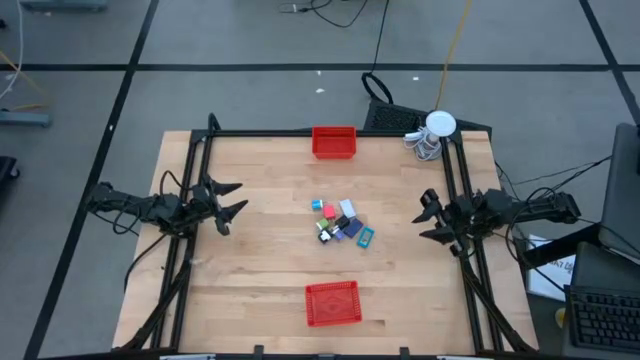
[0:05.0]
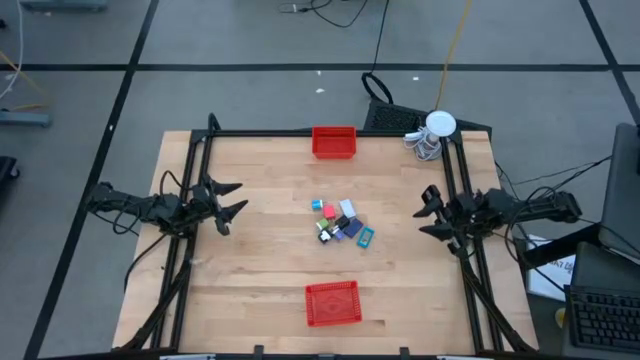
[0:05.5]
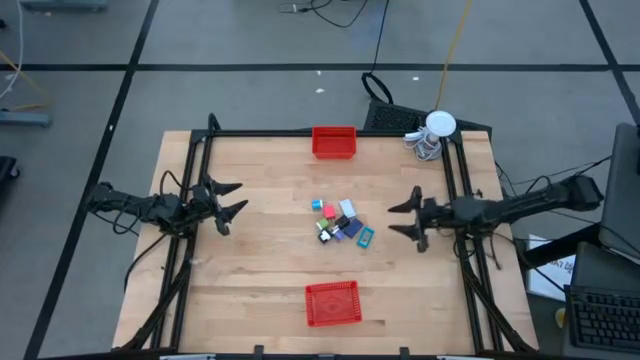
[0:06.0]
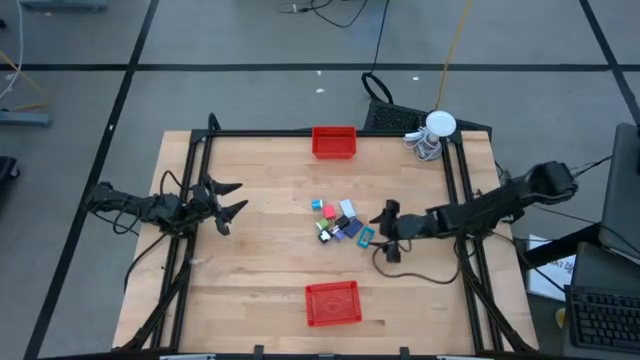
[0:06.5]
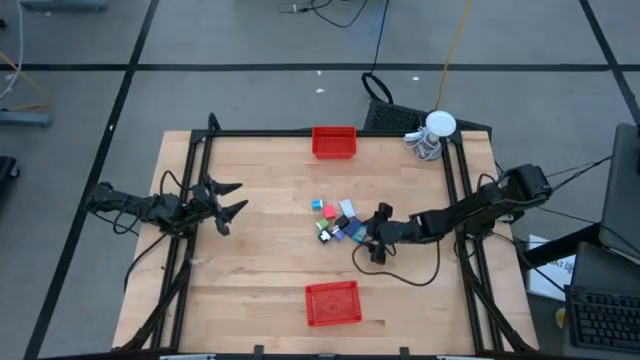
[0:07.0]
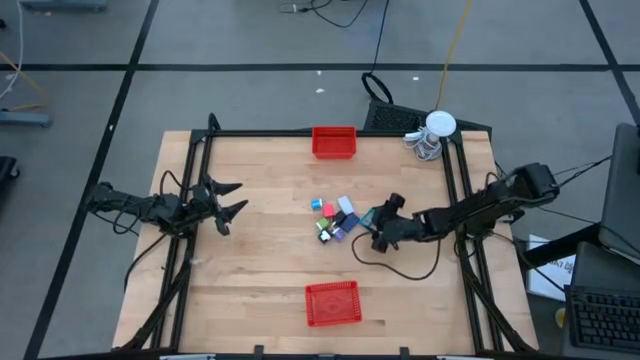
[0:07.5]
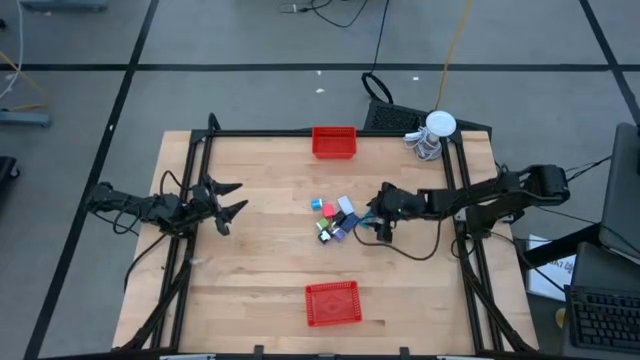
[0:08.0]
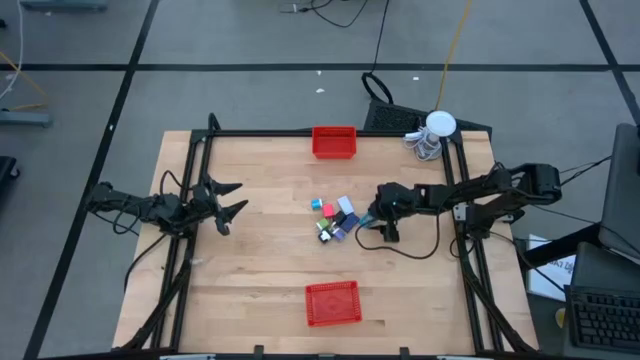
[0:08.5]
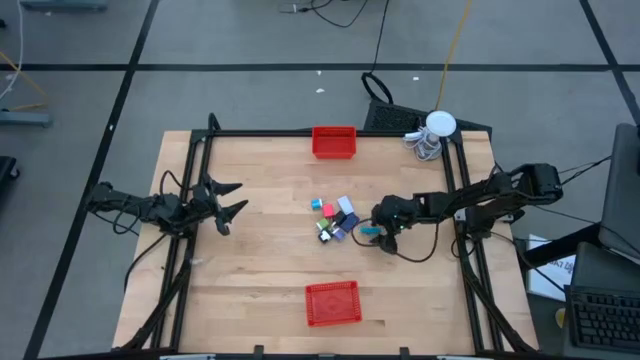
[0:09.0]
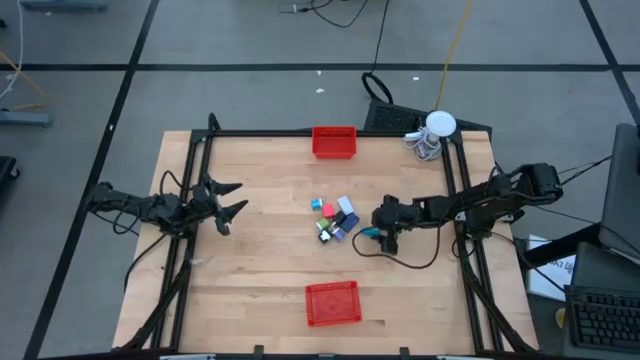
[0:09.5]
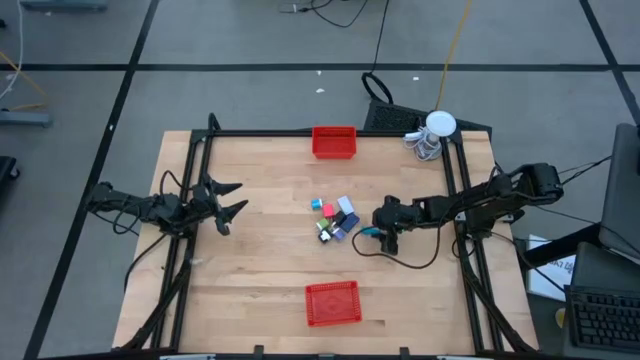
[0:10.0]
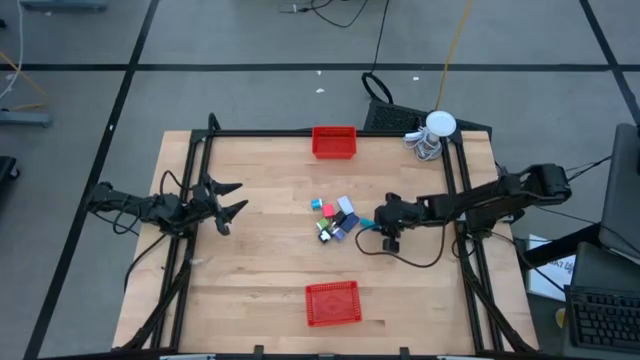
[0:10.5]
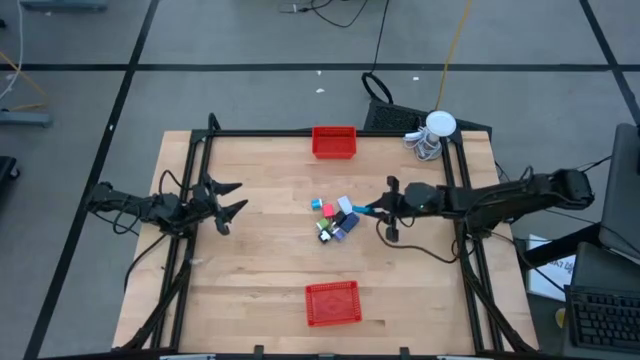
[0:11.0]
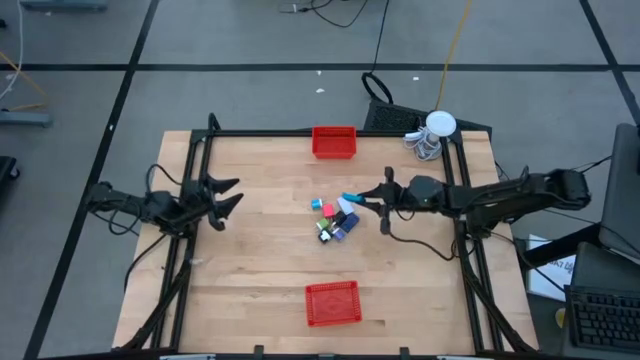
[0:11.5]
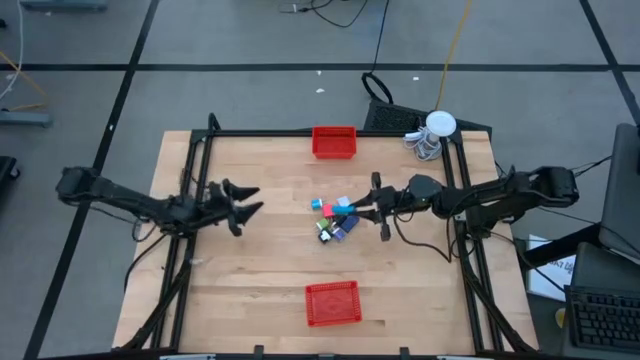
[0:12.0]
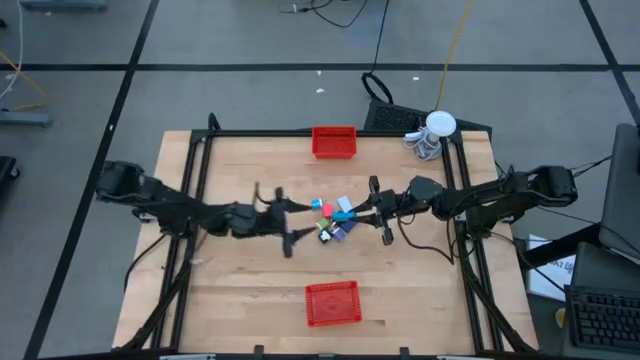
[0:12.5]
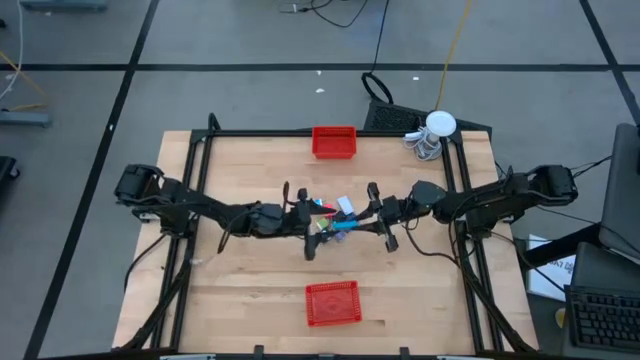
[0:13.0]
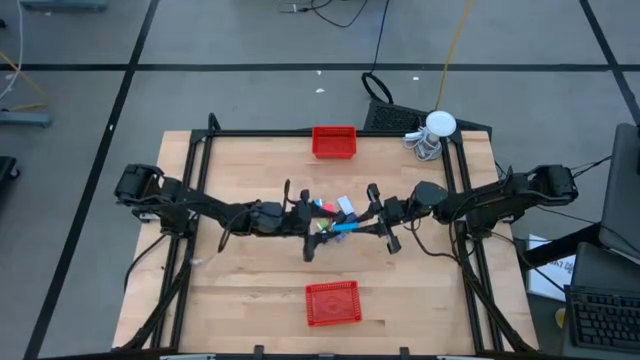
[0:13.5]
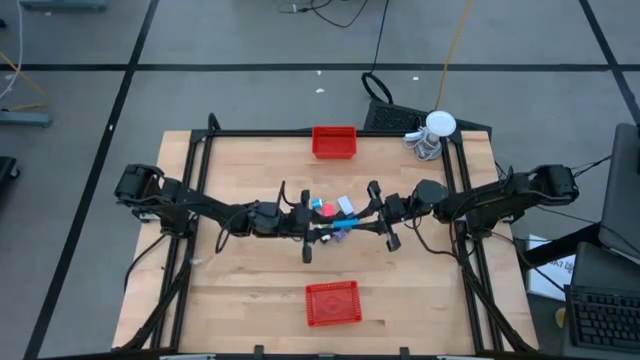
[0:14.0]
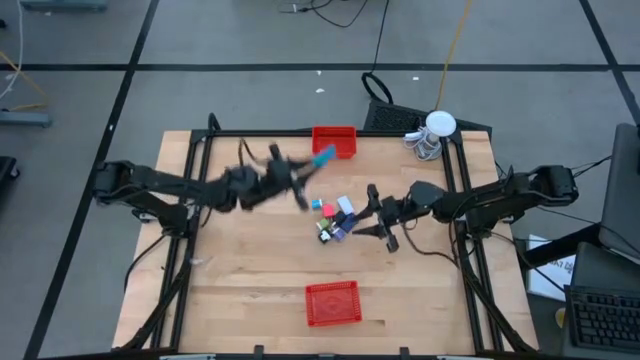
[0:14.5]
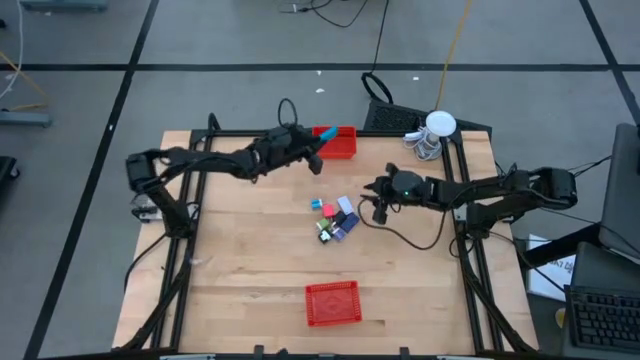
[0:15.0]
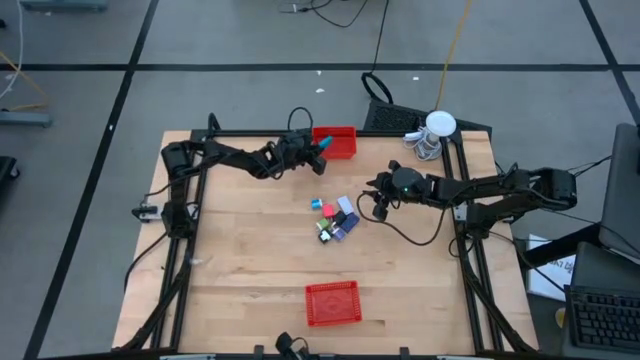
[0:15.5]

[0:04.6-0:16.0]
Task: Pick & Place Office items
Put the blue timer into the top orange bin

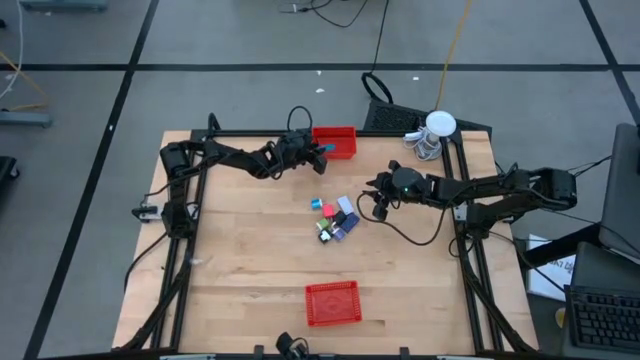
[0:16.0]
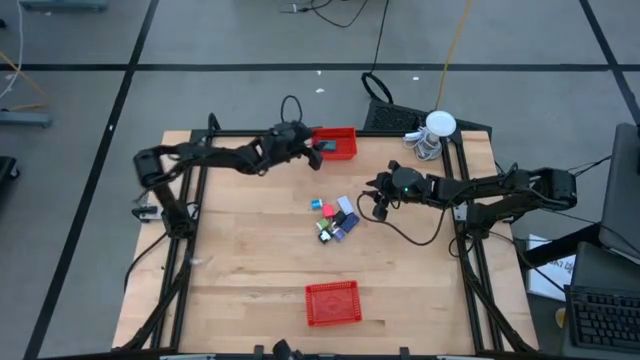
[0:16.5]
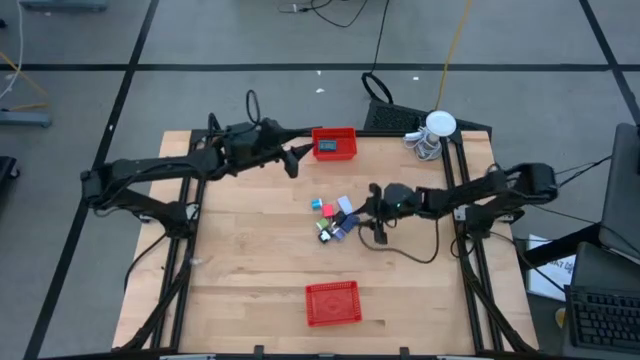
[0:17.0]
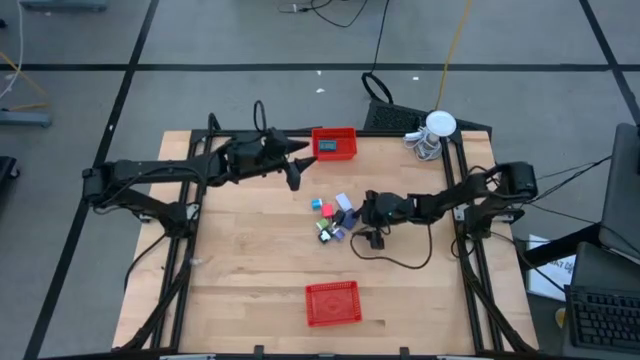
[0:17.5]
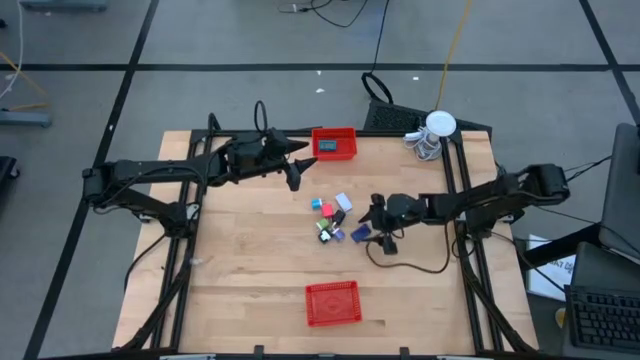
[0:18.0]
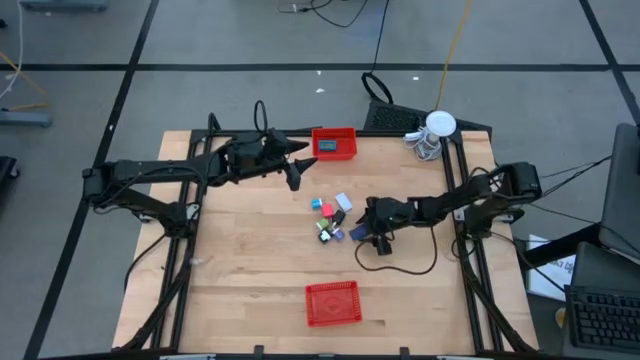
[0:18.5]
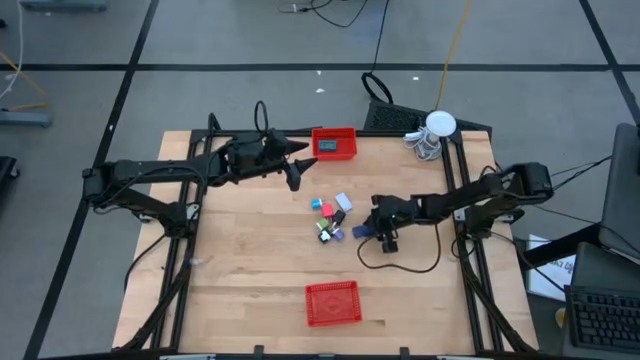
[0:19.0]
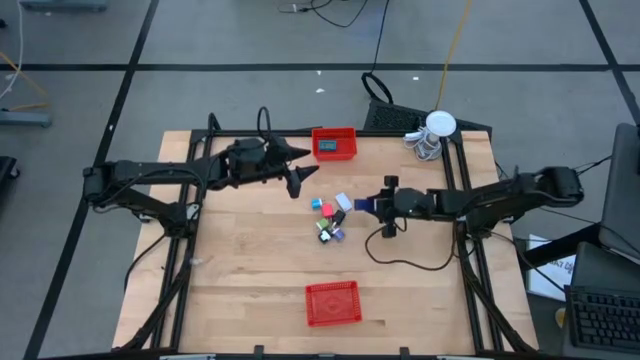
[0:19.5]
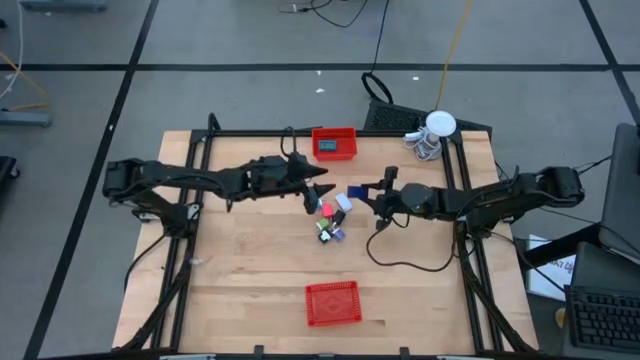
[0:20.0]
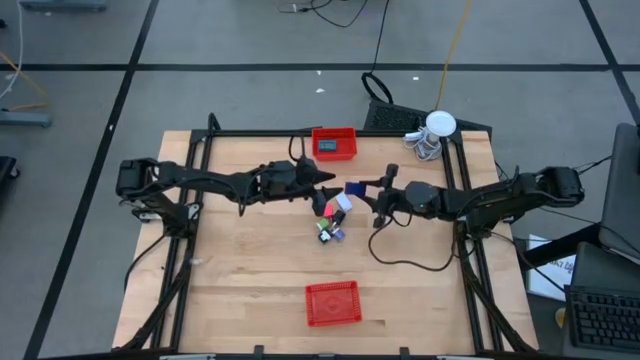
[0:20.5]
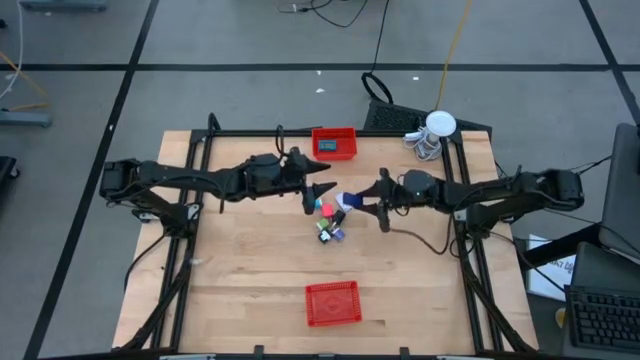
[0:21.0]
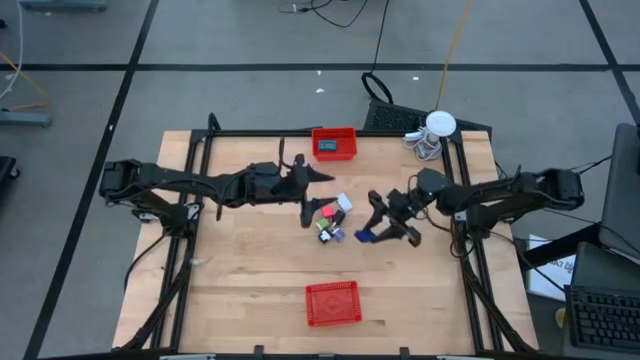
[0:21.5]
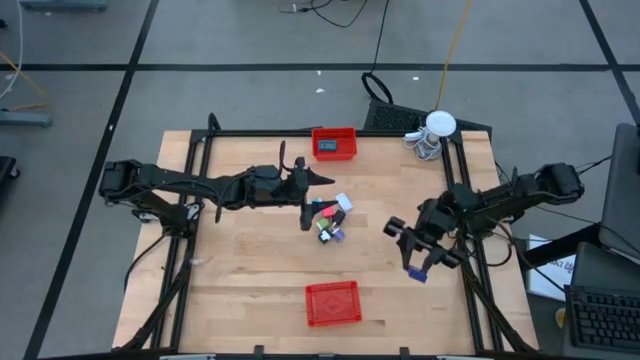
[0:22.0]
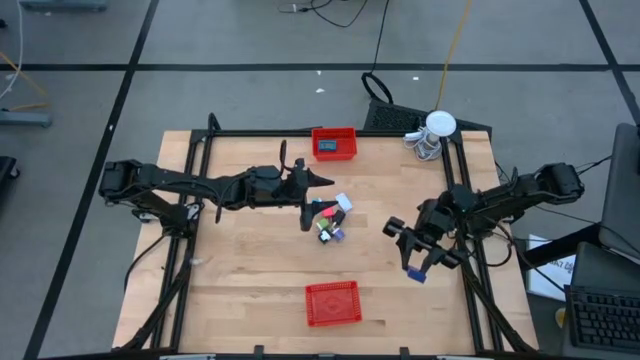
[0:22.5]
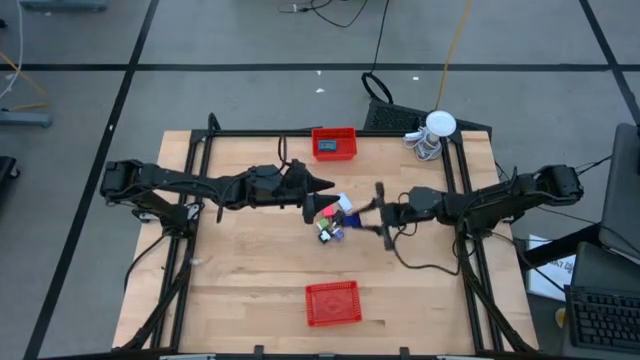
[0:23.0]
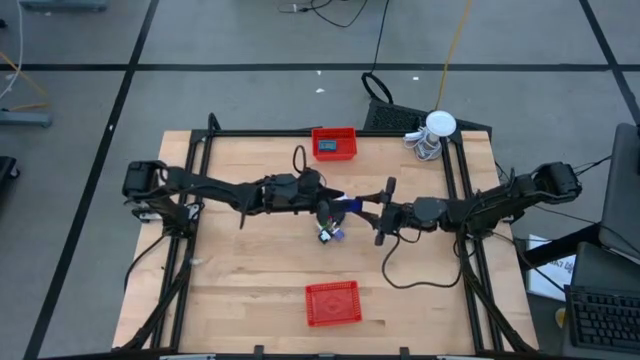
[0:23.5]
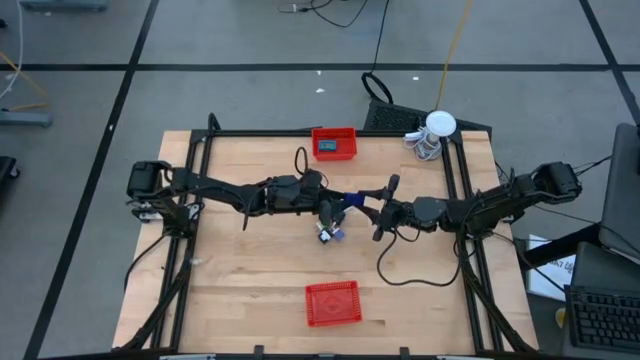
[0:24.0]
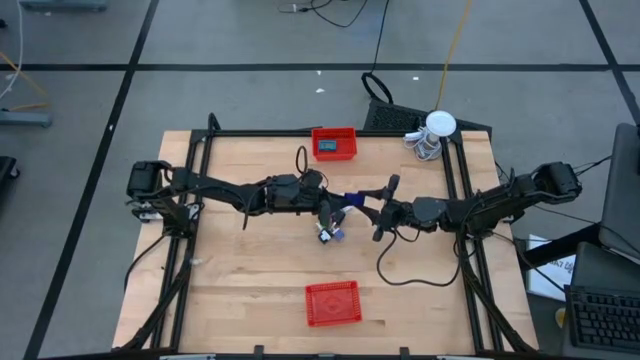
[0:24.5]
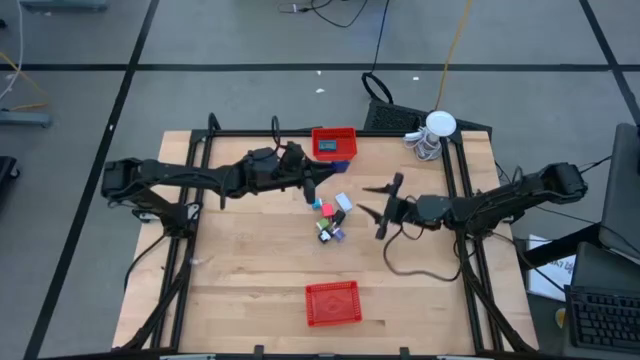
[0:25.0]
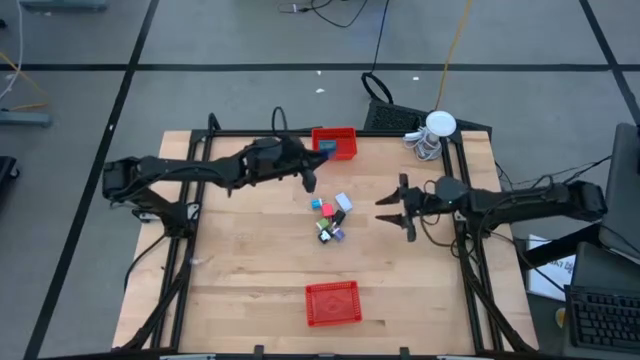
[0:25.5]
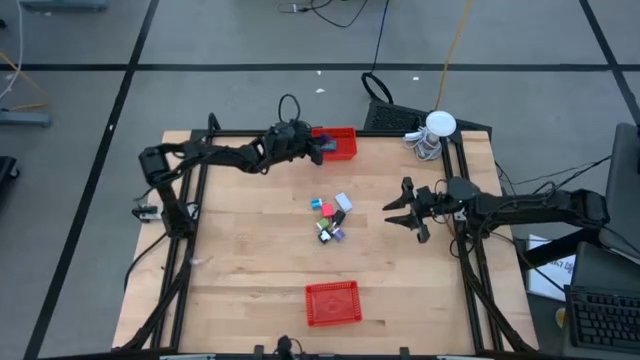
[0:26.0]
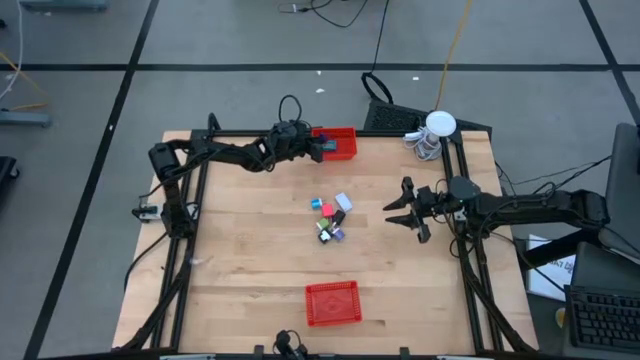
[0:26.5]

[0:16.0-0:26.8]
Put the purple timer into the top orange bin
